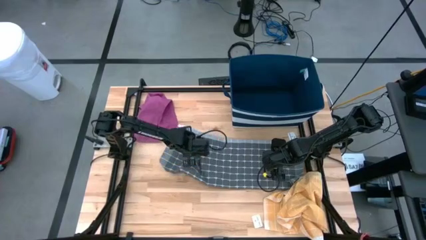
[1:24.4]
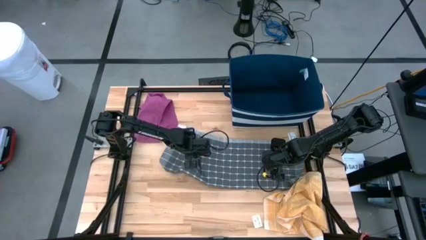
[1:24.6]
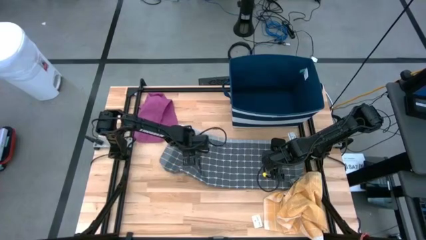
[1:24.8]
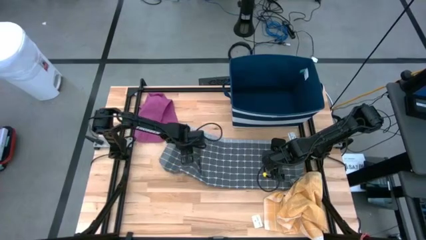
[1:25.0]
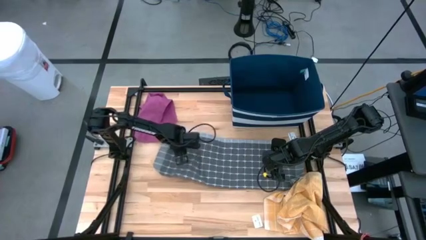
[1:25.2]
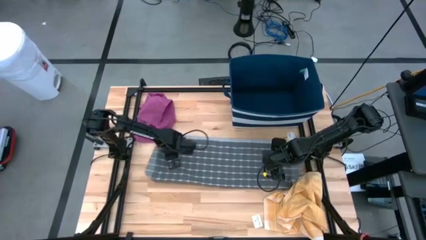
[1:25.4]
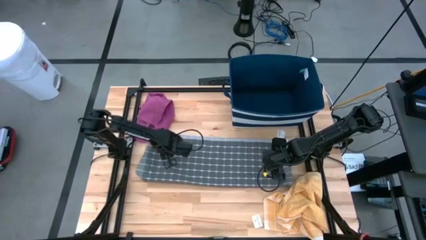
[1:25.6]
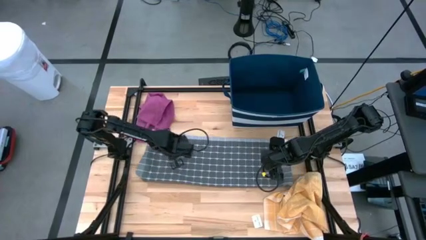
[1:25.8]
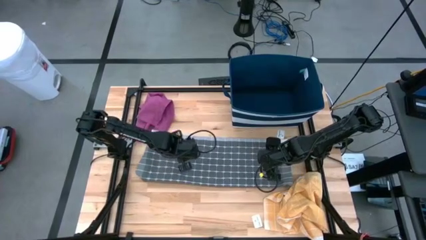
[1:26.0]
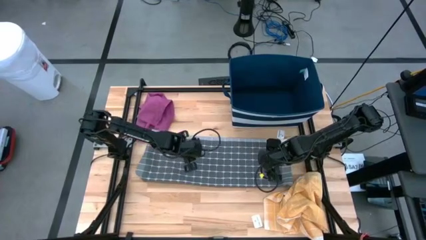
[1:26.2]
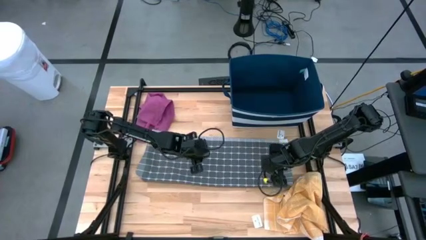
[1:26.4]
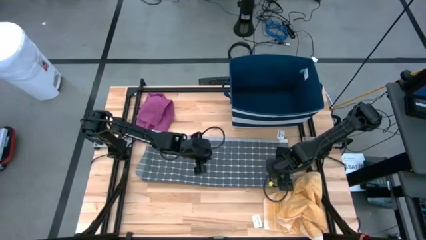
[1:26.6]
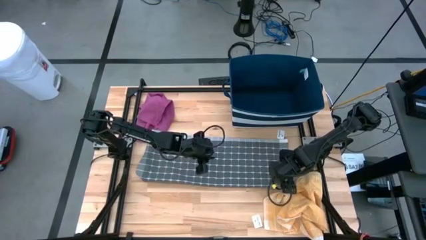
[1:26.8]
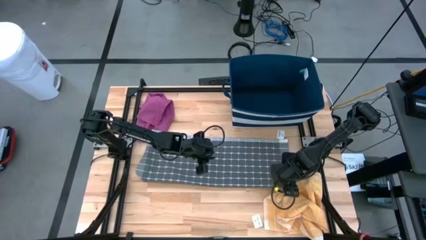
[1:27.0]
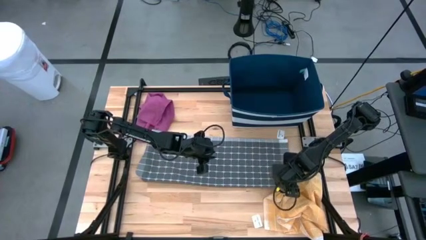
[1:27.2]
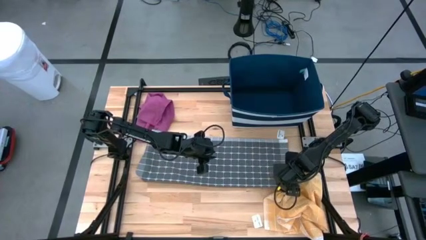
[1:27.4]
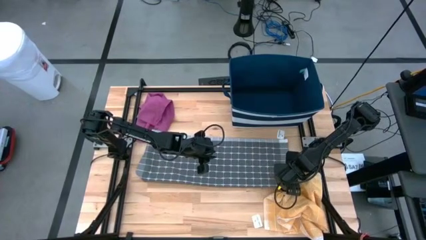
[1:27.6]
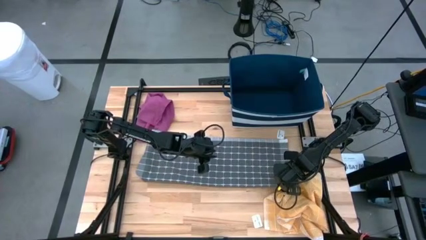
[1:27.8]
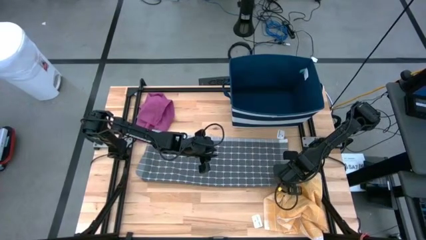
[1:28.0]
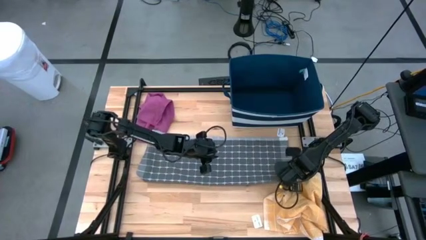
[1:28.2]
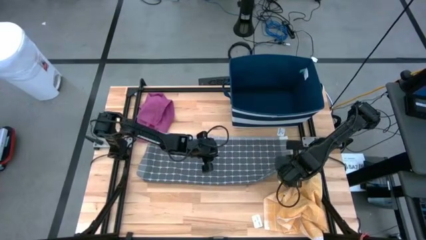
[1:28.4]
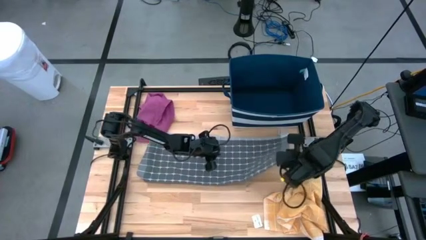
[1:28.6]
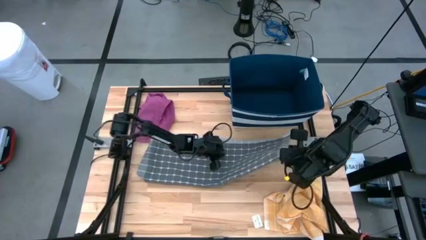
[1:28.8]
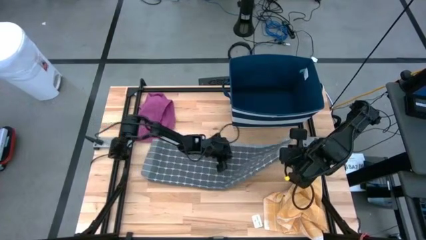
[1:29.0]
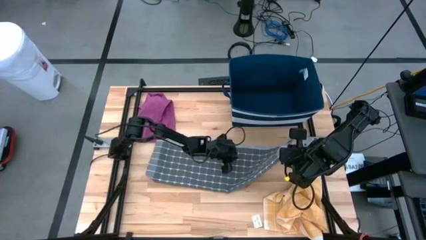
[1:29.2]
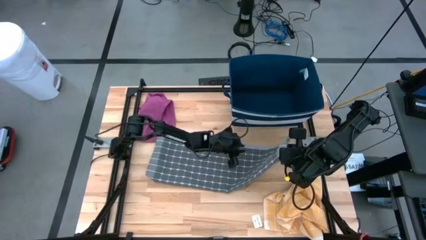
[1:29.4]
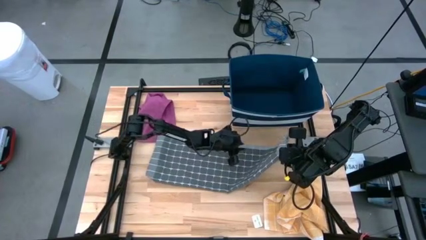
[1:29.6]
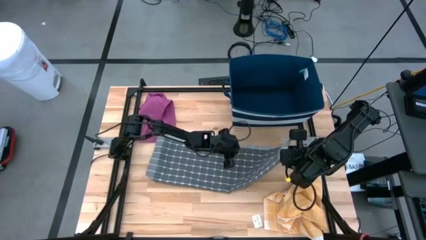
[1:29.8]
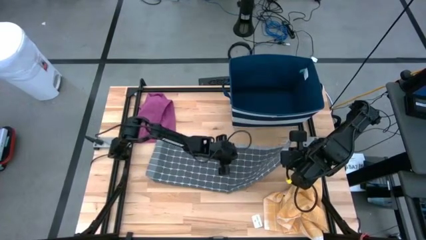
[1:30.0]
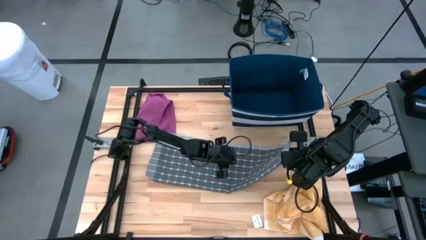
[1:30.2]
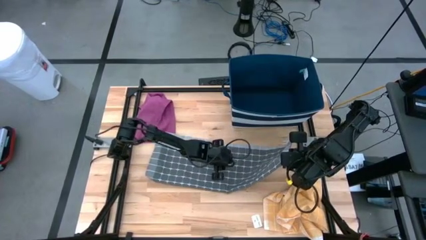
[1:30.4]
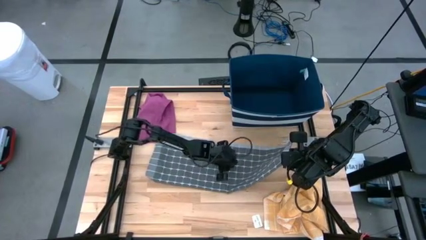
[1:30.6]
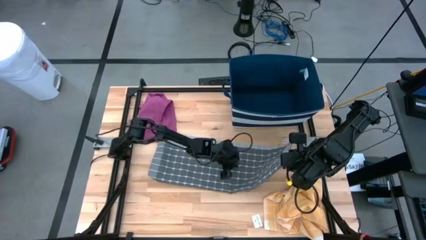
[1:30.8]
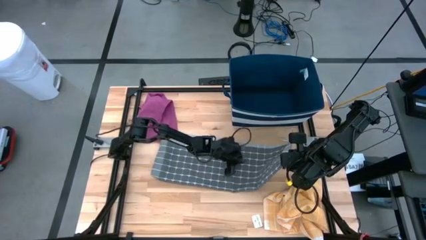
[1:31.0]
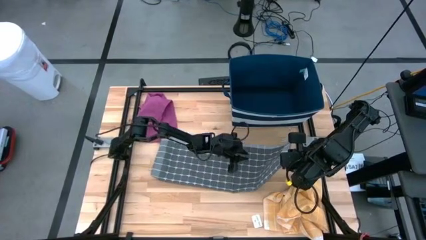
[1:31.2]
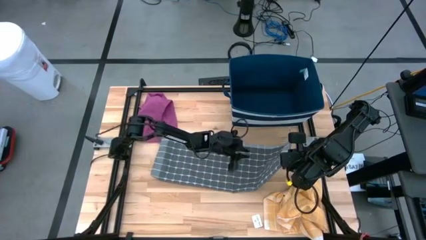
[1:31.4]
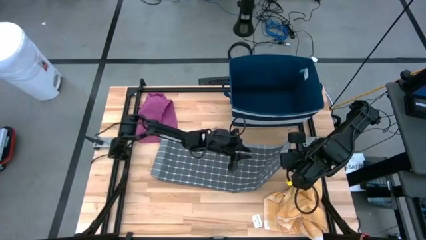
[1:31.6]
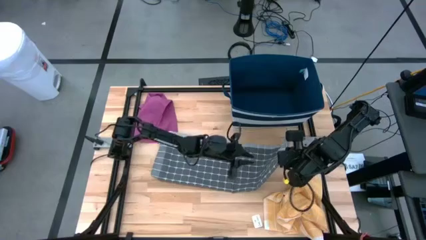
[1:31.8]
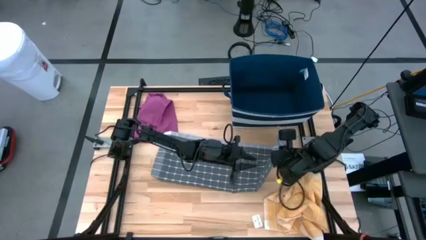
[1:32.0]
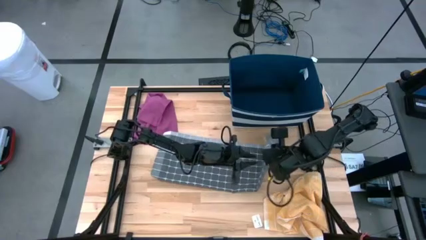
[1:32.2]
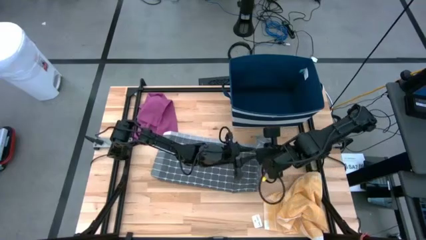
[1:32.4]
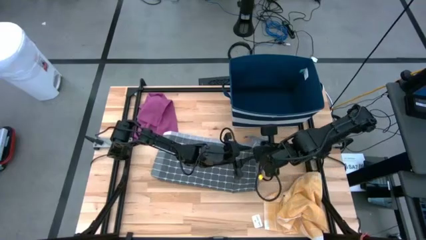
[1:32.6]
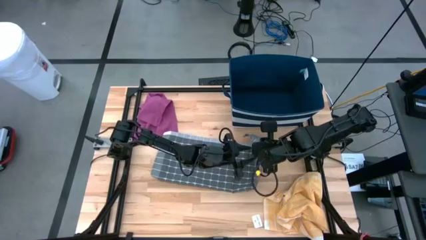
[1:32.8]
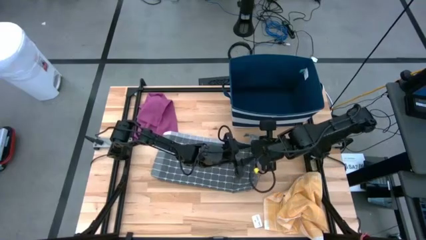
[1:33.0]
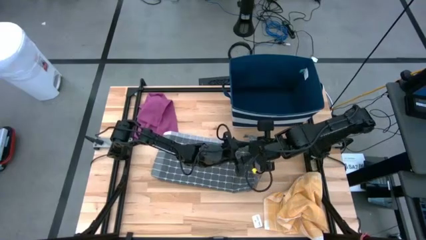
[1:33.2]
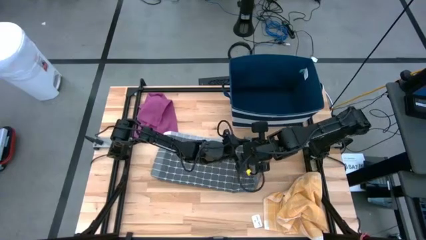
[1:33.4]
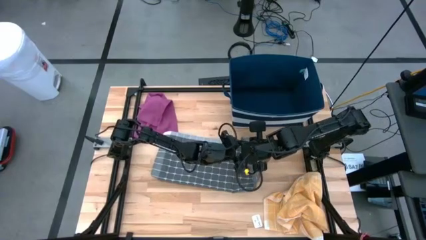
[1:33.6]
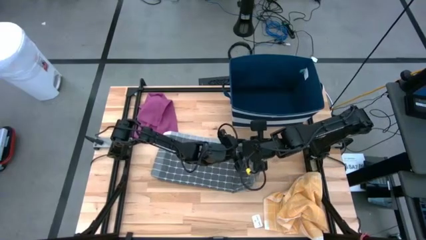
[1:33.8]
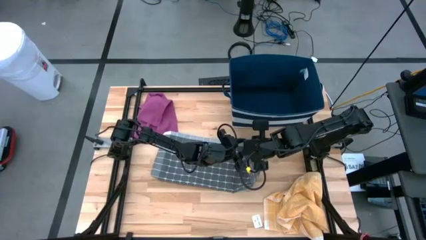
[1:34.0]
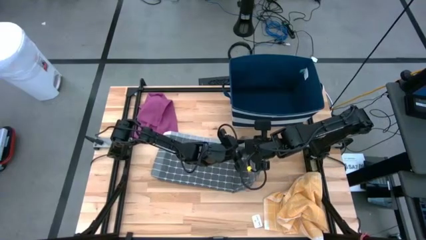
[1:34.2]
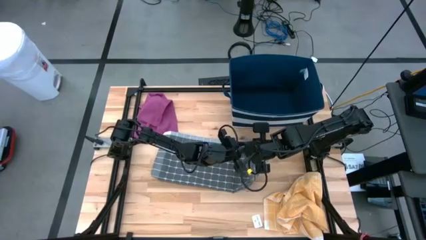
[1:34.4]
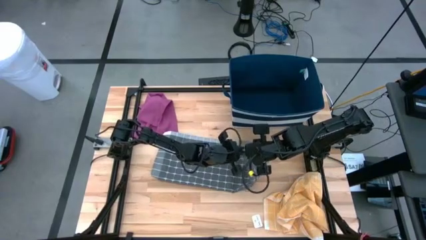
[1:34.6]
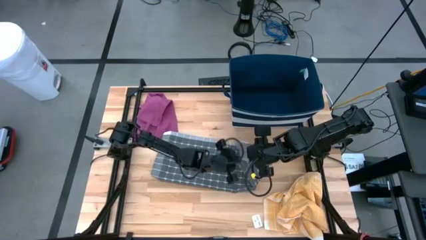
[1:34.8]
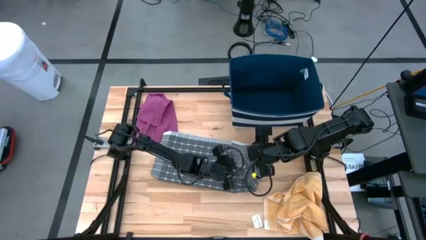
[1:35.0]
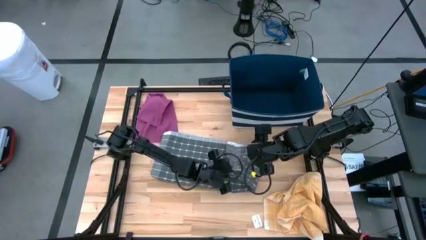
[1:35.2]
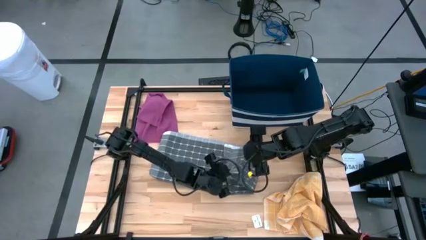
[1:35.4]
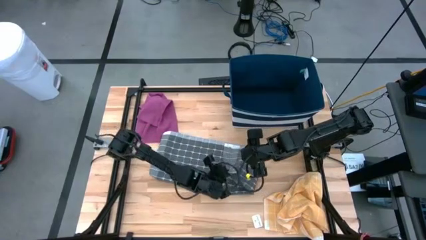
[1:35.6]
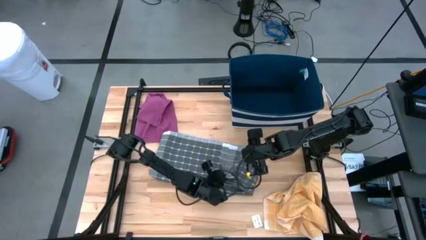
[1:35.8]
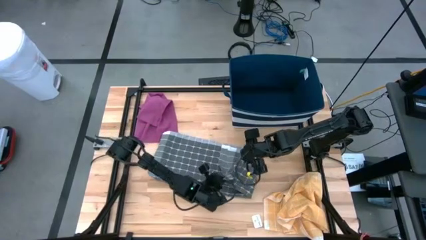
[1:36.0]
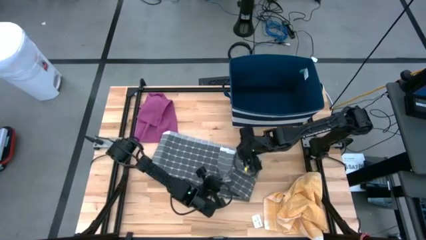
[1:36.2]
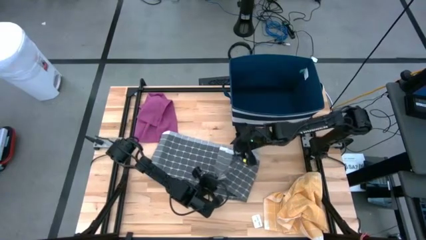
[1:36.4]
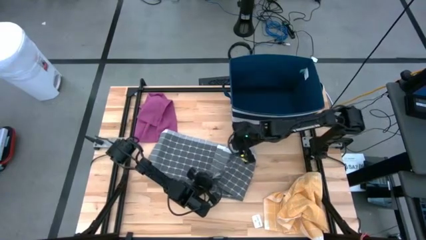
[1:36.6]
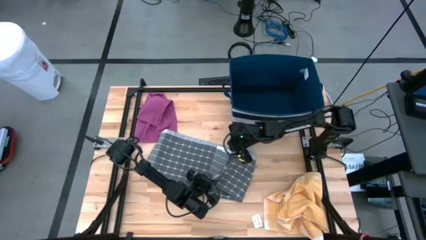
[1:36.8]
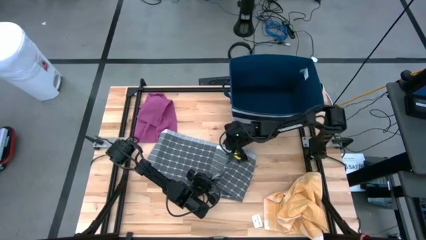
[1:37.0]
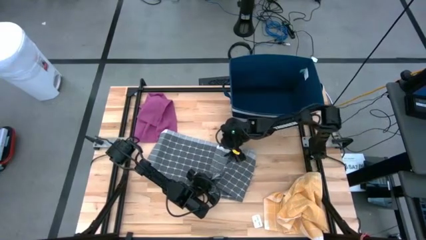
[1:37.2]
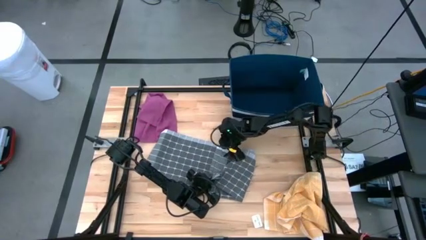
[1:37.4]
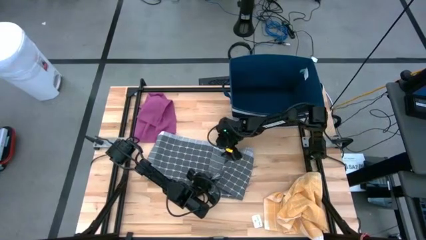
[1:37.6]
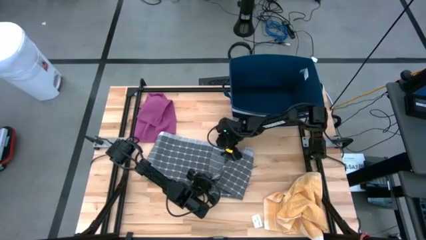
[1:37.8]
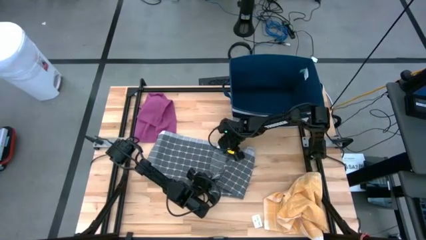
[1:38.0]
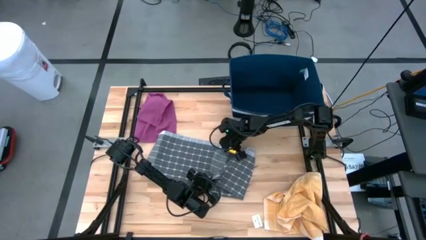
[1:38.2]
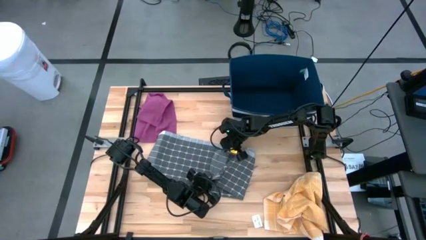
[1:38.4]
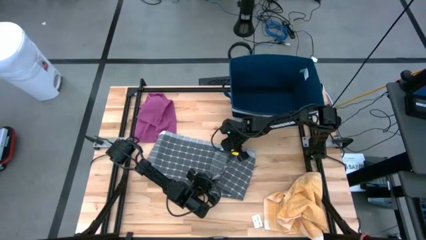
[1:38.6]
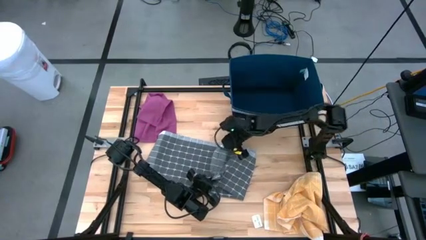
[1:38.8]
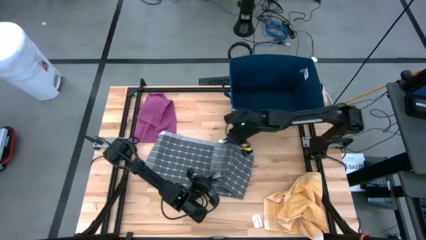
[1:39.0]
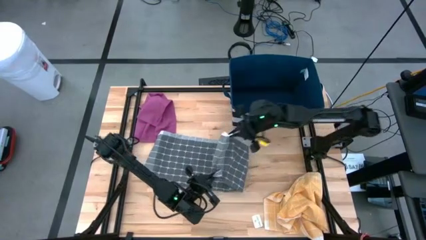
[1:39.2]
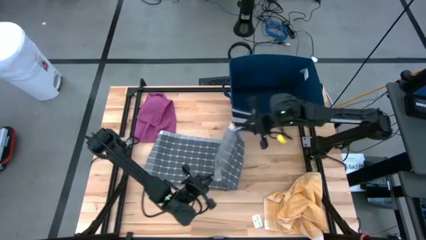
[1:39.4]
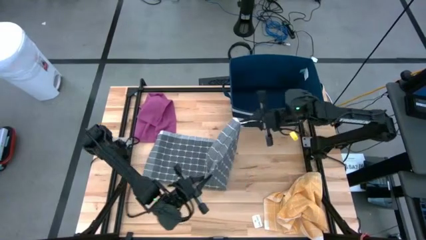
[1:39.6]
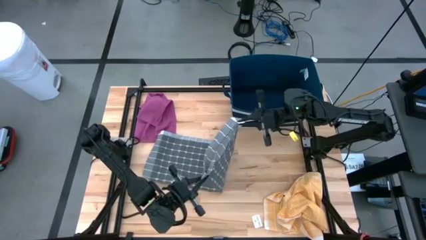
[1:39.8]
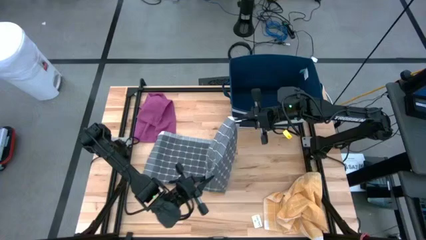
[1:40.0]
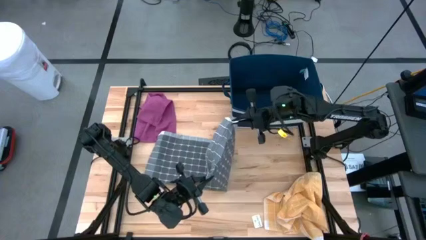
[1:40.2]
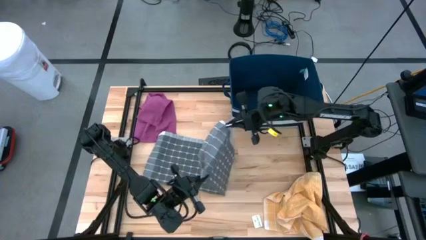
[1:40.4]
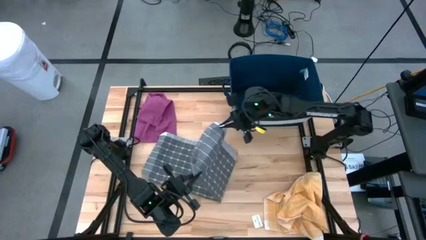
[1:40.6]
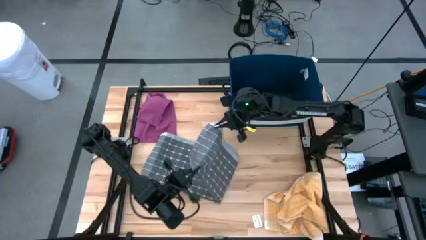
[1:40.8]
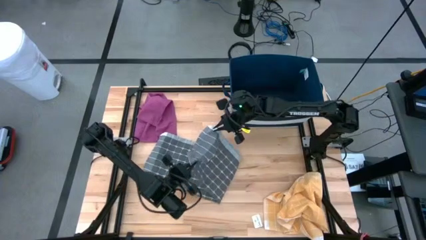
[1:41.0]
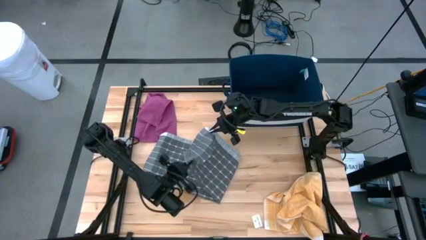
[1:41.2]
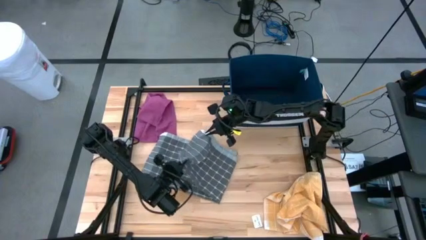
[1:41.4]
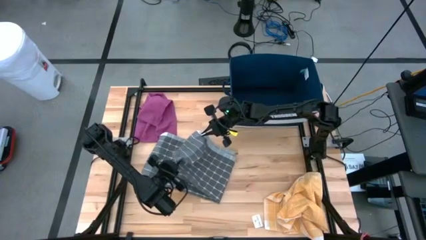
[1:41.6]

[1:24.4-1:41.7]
Task: Fold towel
Fold the gray checkered towel
